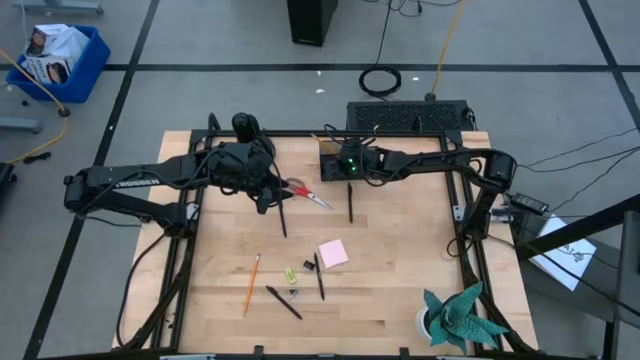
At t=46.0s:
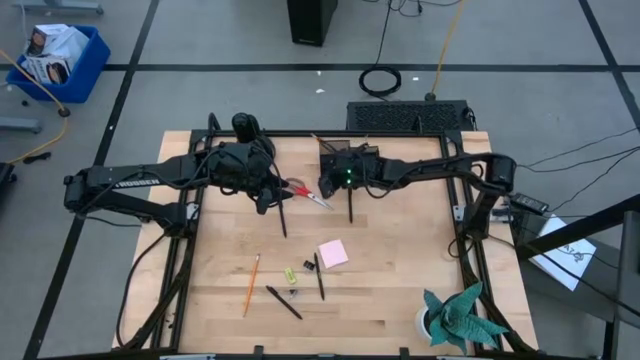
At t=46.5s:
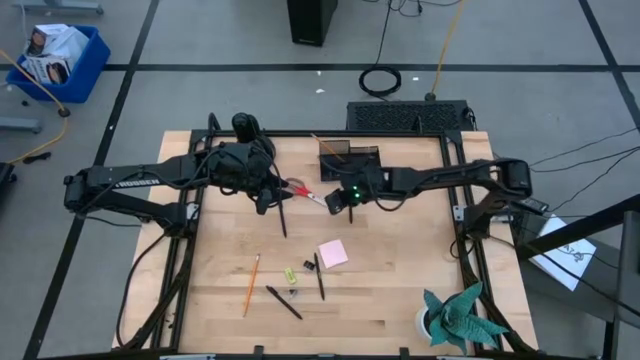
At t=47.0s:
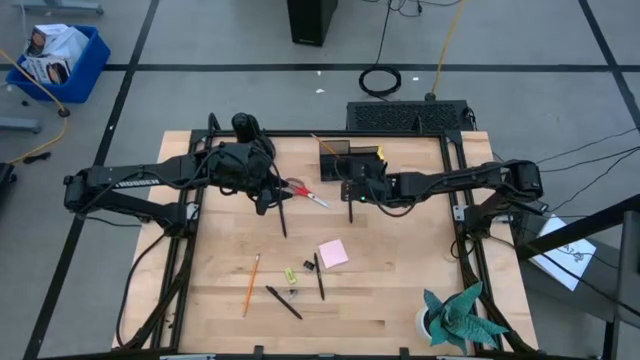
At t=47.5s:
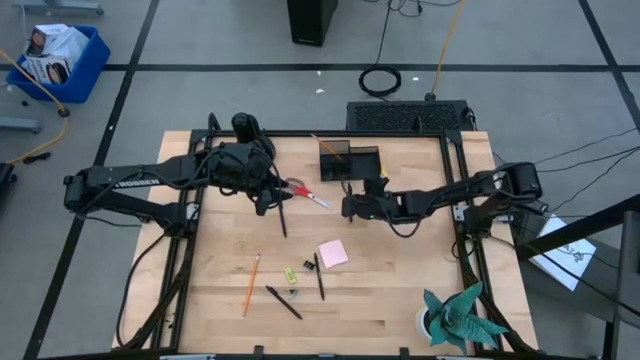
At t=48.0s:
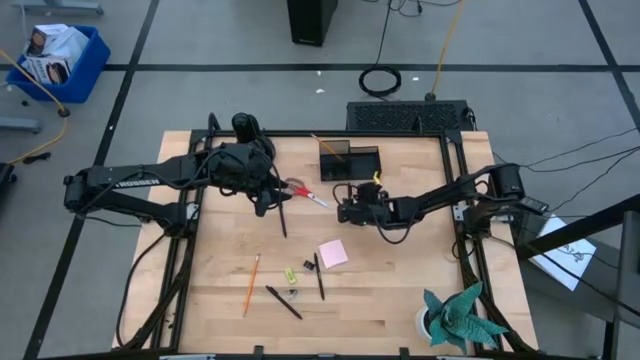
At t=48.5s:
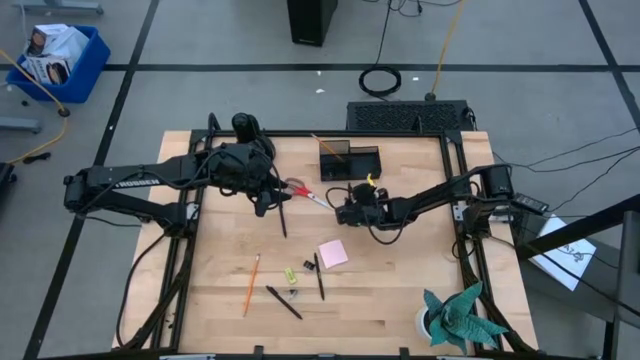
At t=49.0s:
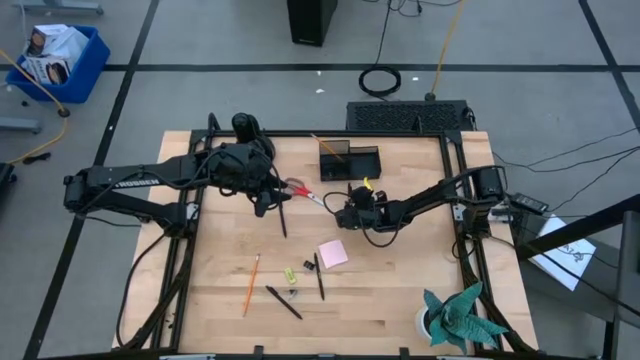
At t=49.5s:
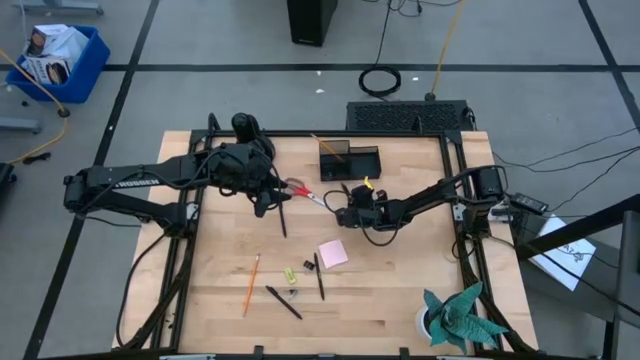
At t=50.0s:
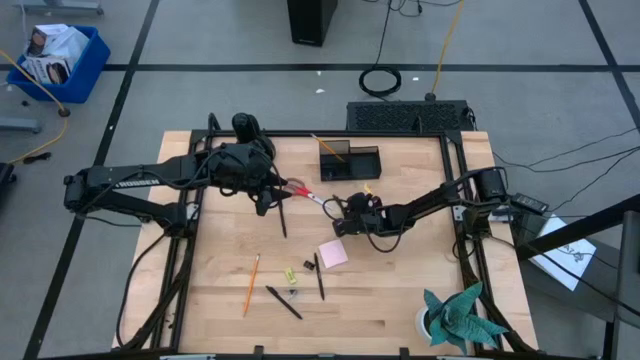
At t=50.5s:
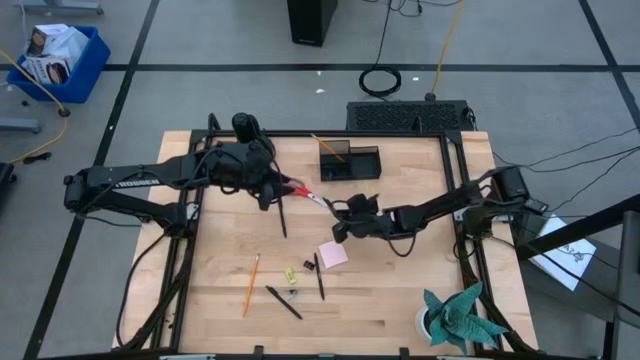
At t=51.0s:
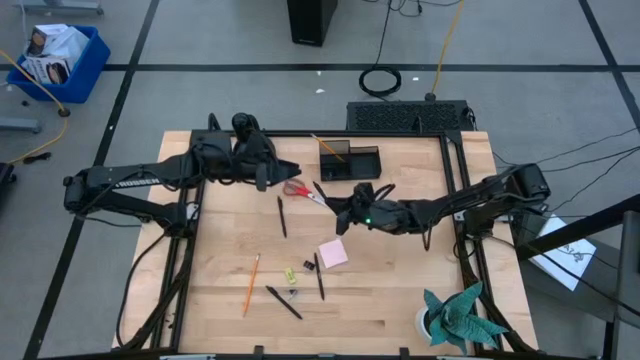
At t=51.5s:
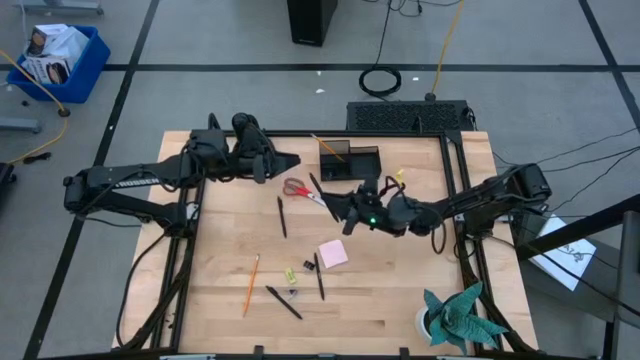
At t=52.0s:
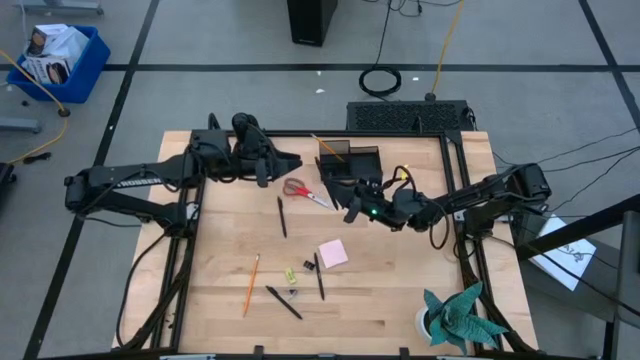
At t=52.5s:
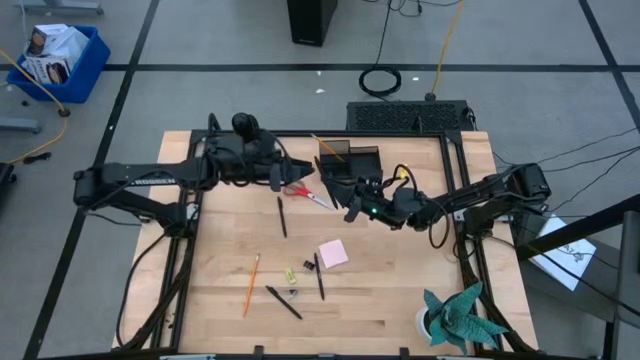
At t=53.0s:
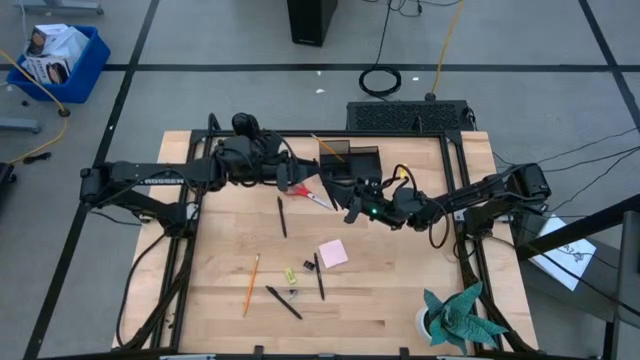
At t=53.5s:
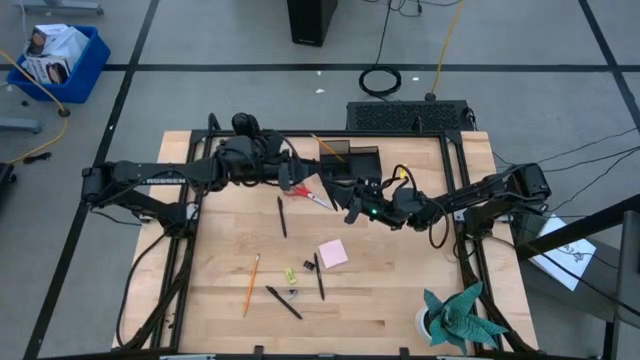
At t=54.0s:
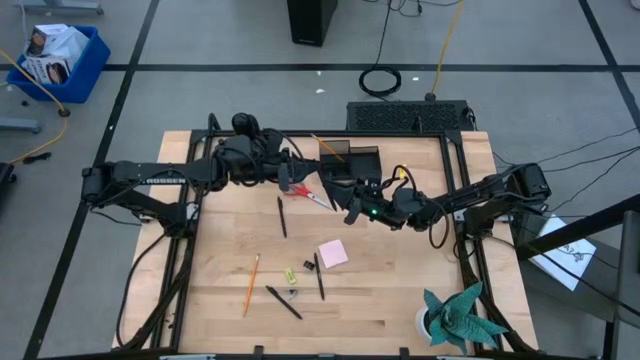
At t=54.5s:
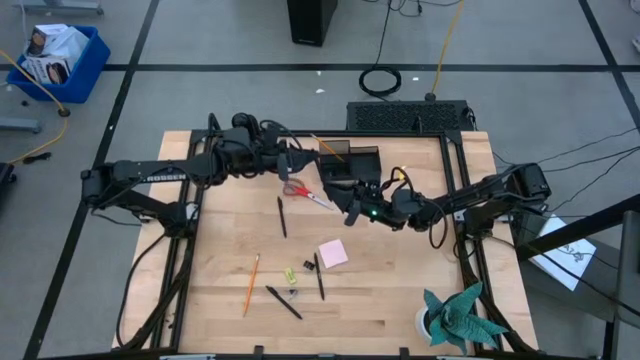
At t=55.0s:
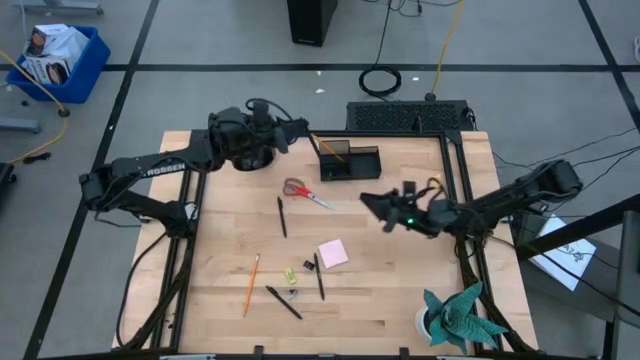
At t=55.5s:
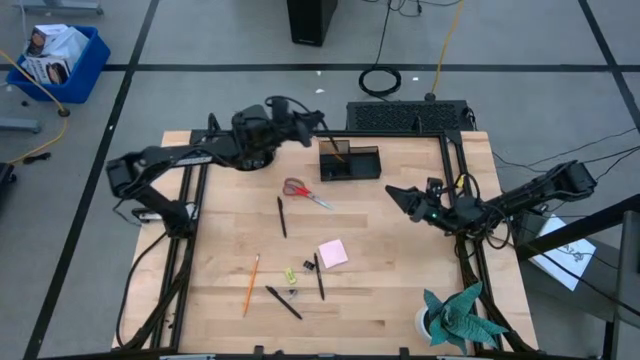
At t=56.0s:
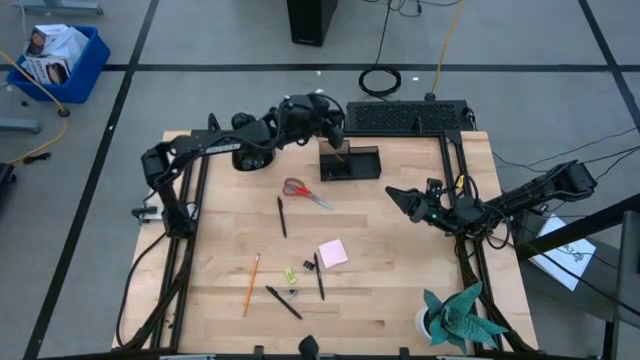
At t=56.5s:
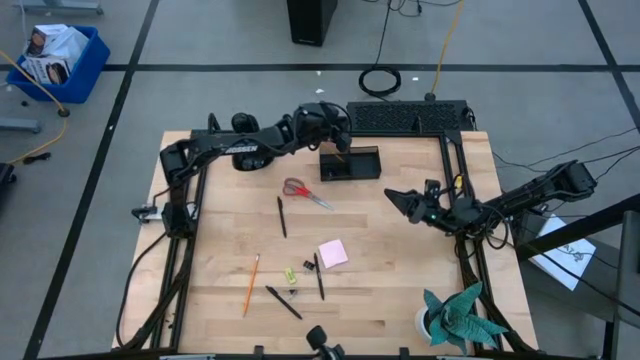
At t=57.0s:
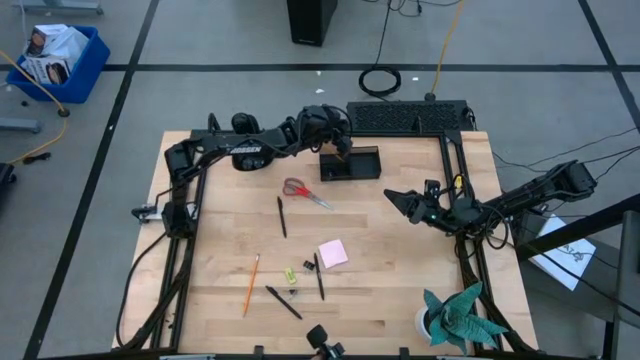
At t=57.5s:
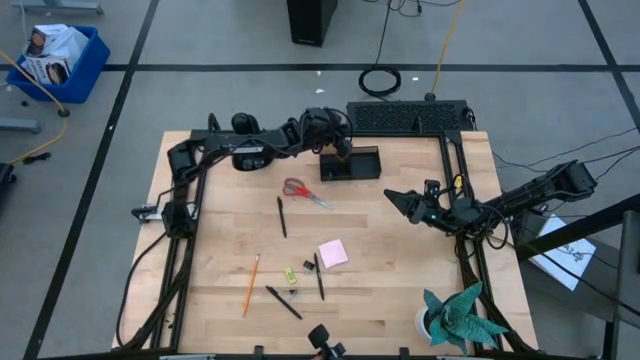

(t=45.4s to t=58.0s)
Task: Pick and place office supplies into organizer
Put the black pen into the black desk organizer

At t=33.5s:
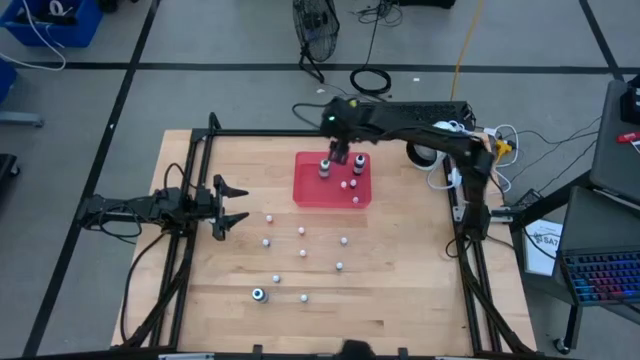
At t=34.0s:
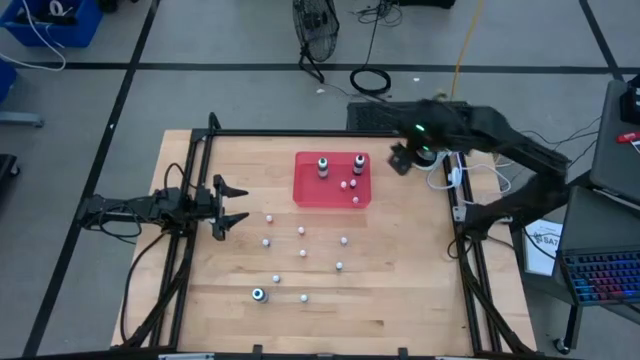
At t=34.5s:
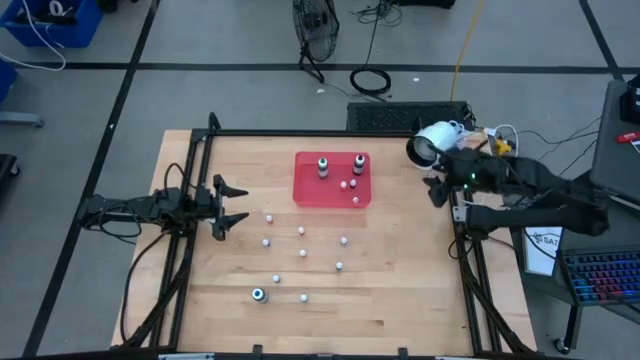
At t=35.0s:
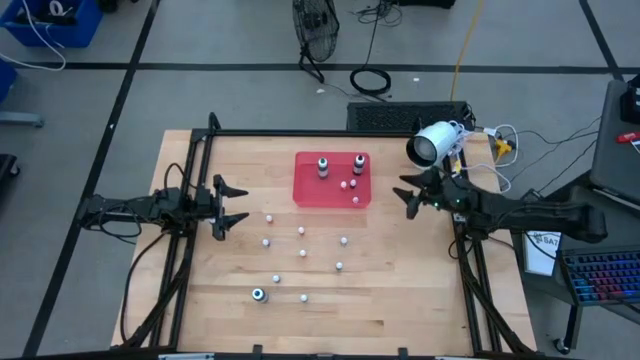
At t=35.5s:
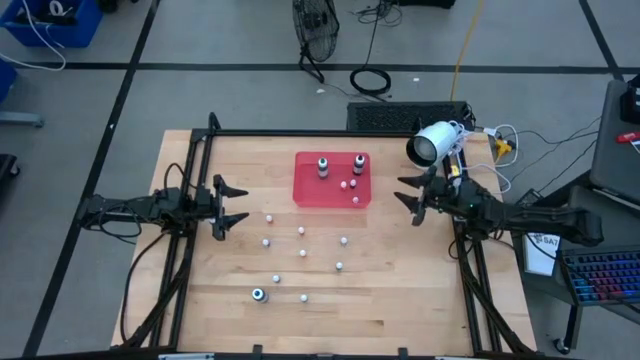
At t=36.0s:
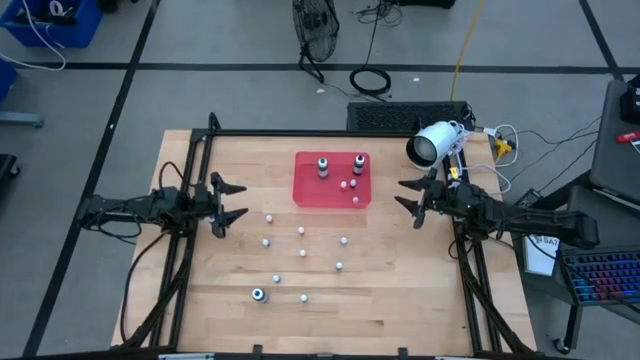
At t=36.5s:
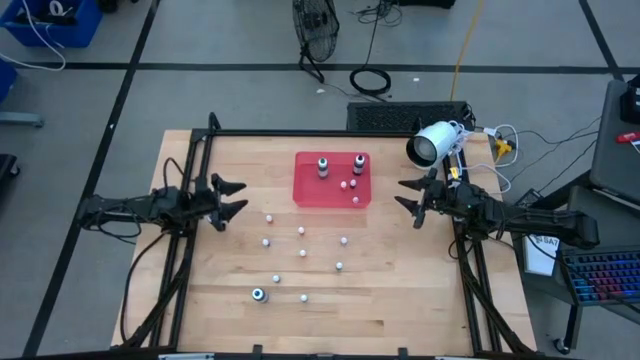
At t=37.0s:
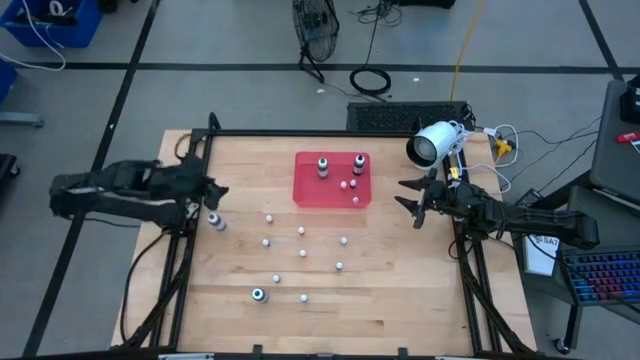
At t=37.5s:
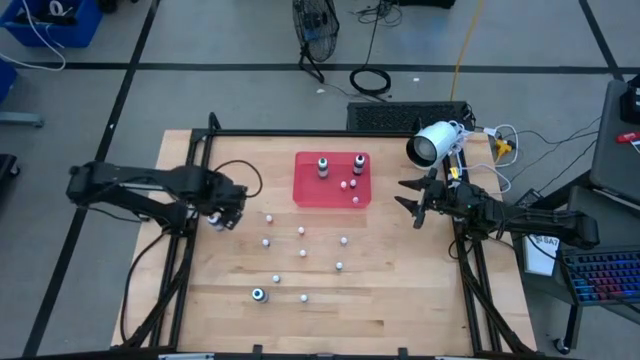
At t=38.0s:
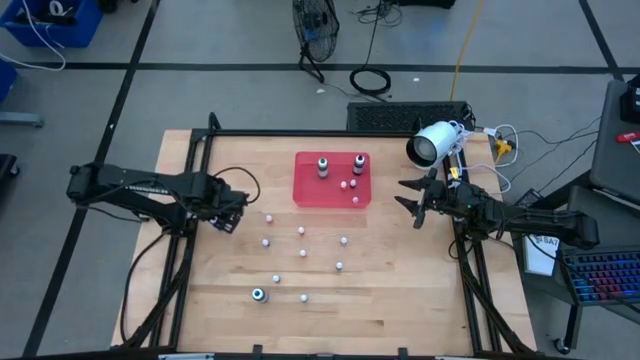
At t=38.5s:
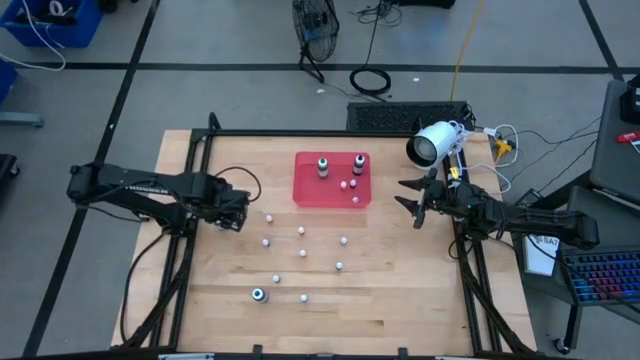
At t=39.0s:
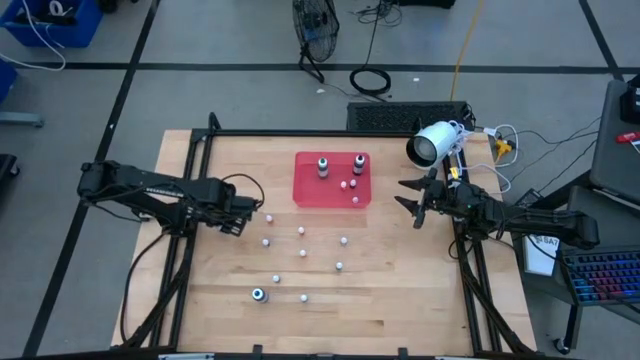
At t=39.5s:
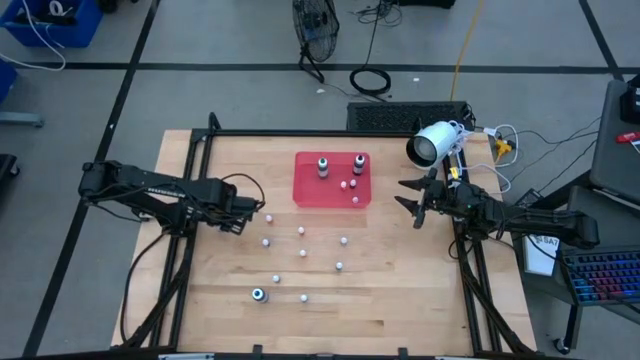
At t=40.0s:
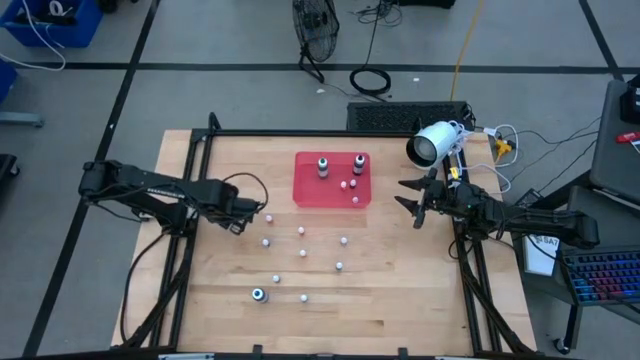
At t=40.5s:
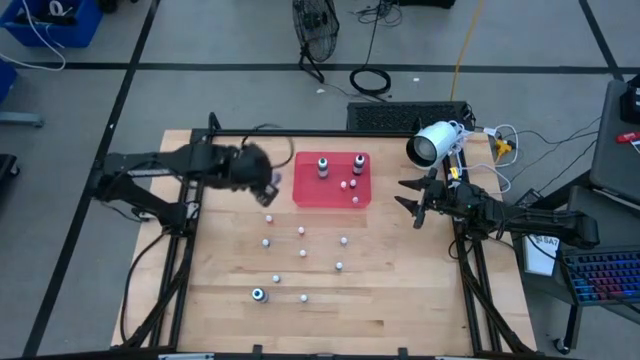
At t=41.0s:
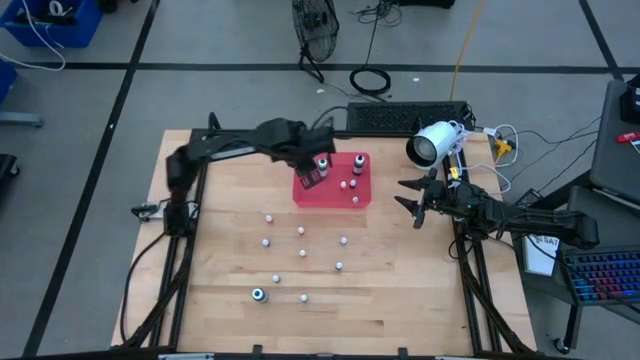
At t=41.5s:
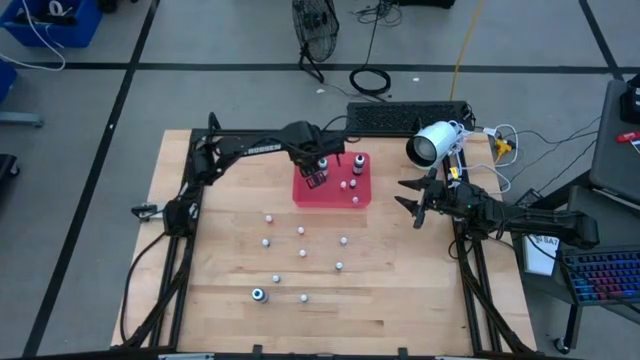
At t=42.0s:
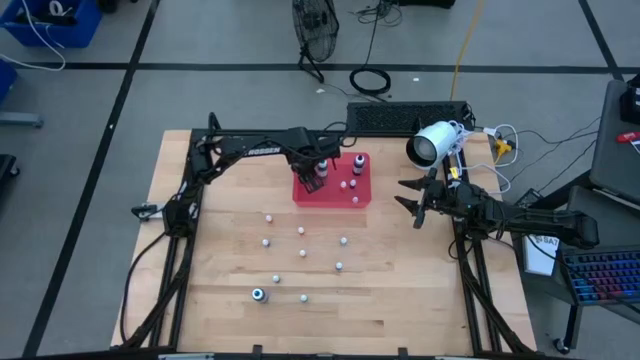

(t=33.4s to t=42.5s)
Task: Pick & Place food coloring
Put the large purple food coloring bottle into the bin
